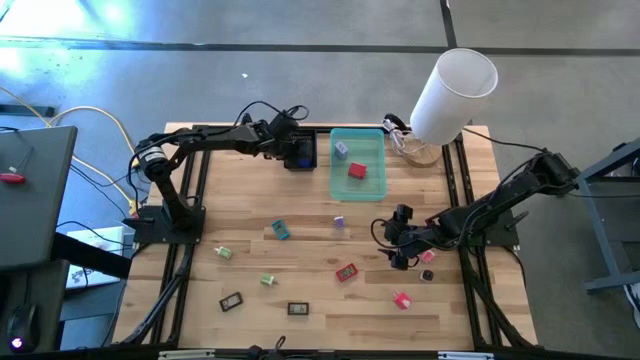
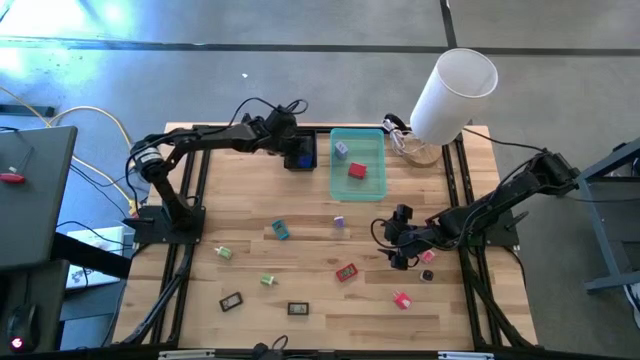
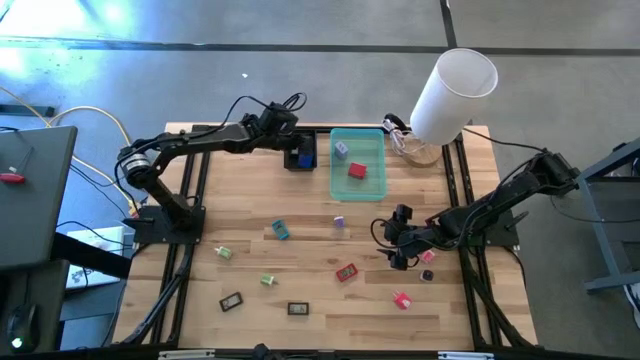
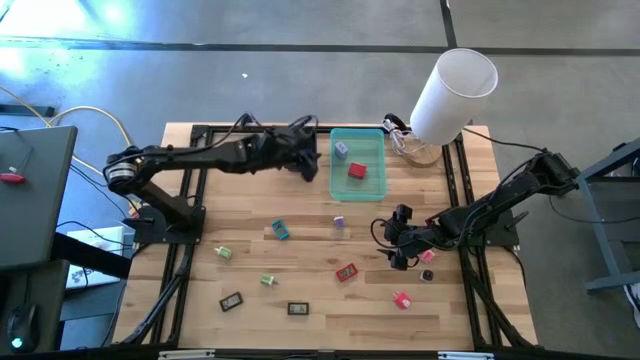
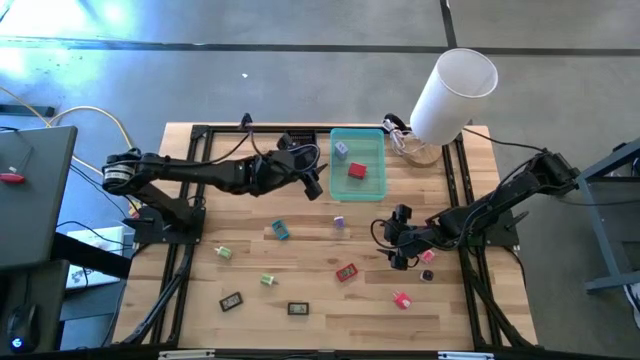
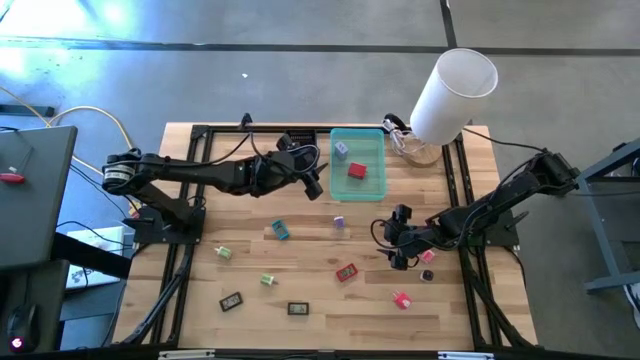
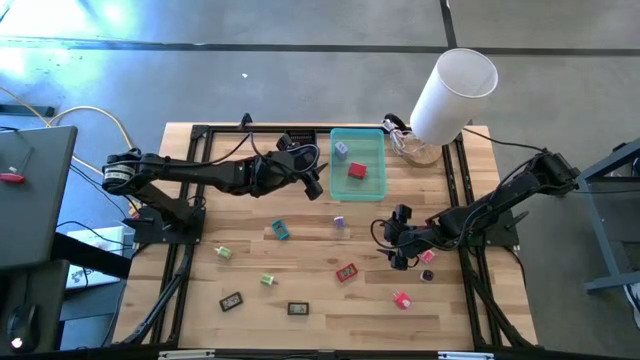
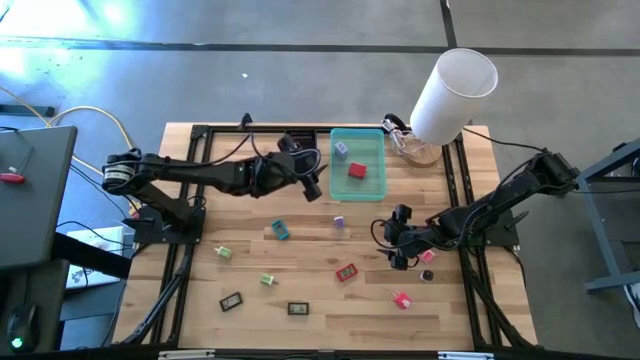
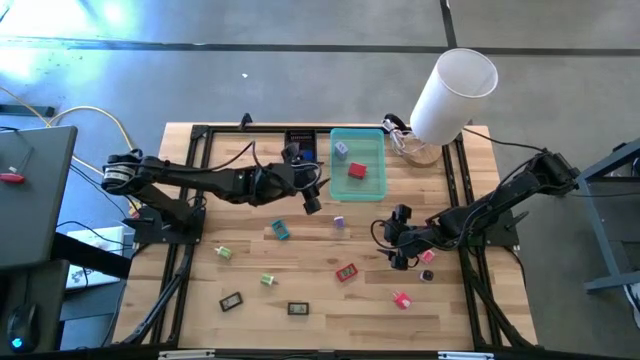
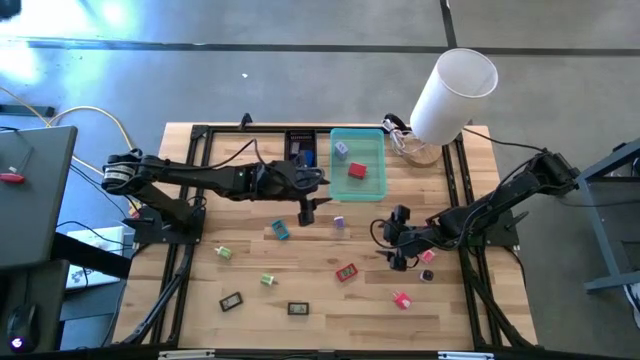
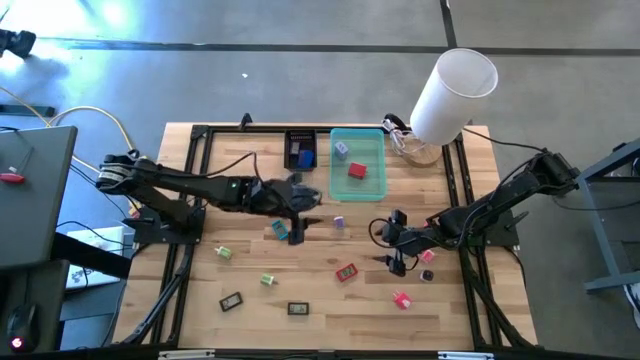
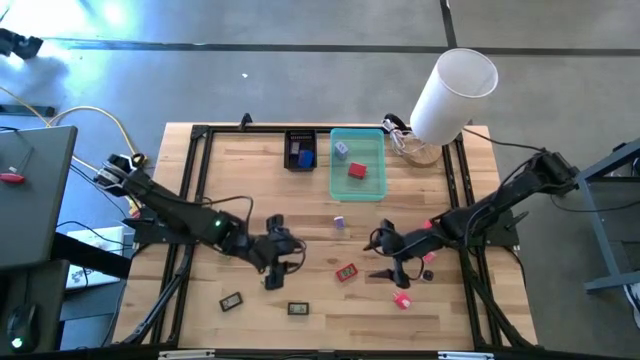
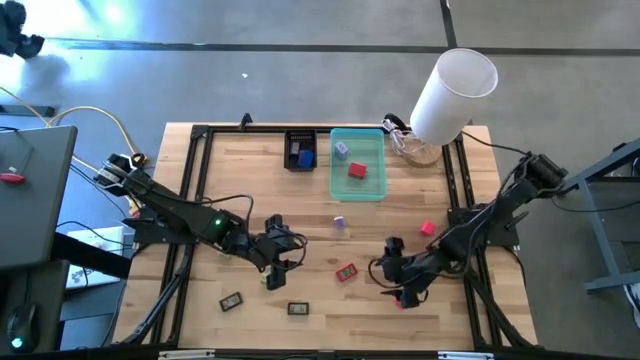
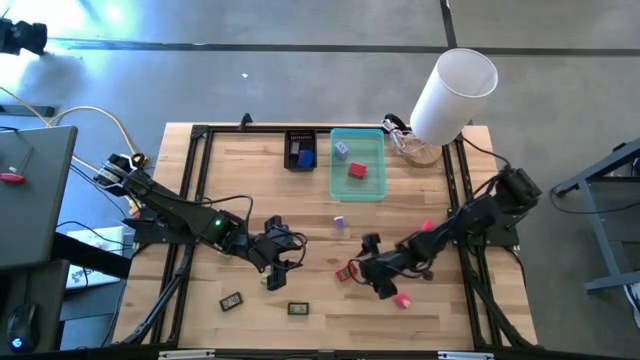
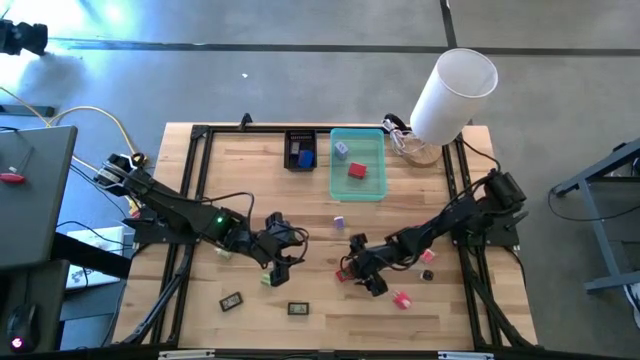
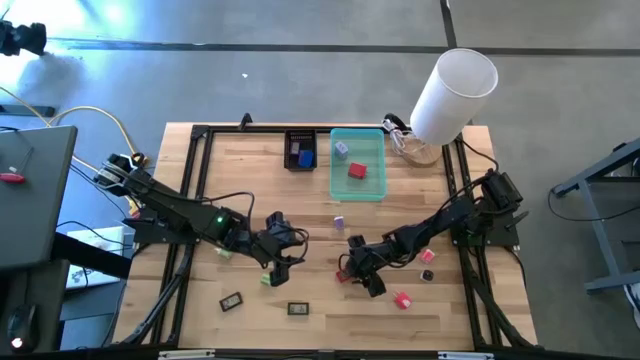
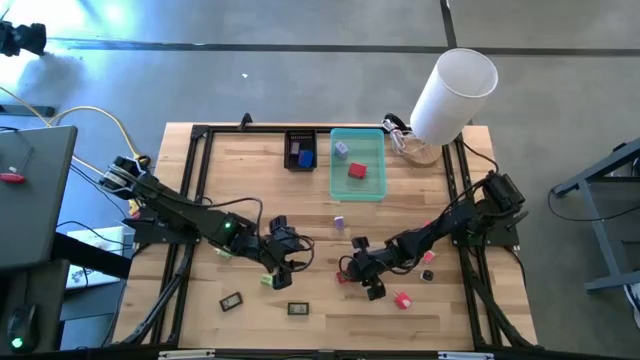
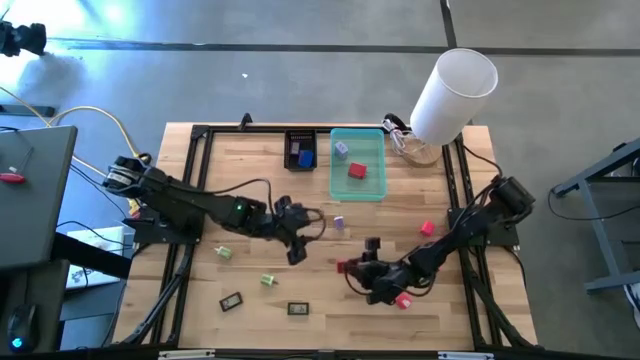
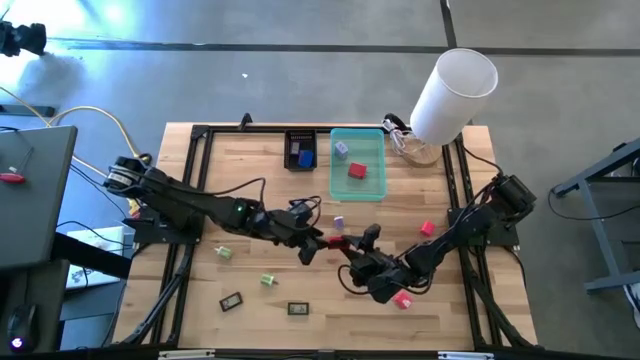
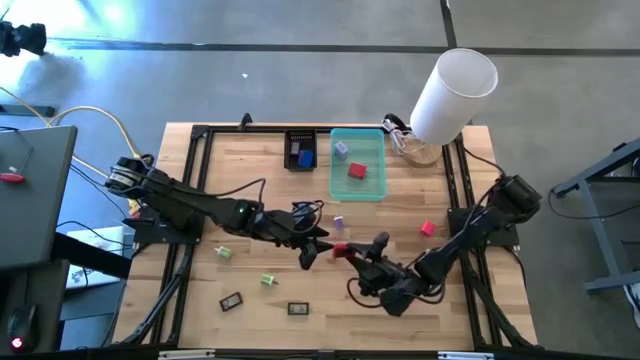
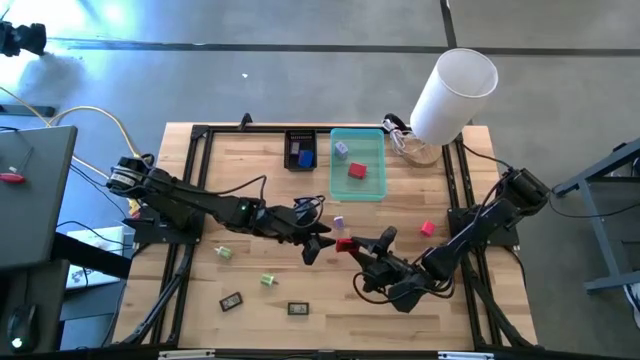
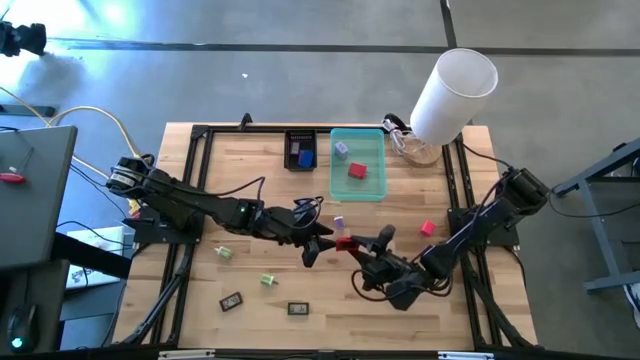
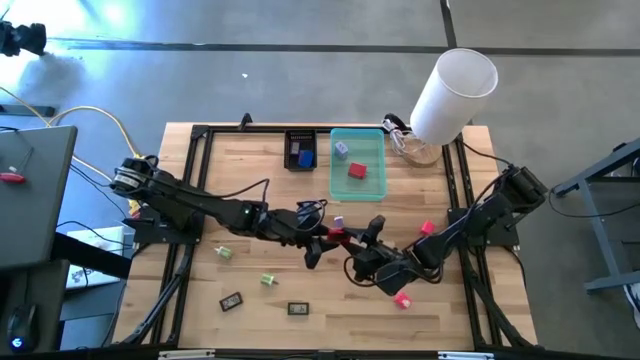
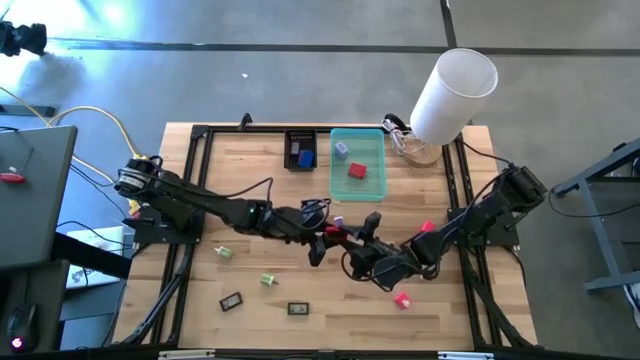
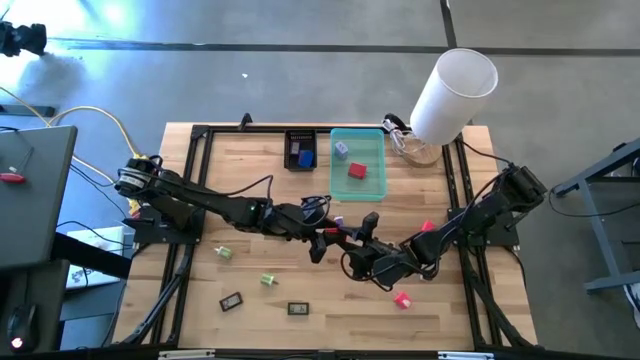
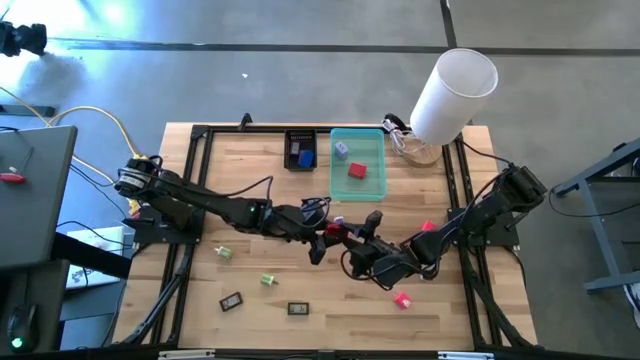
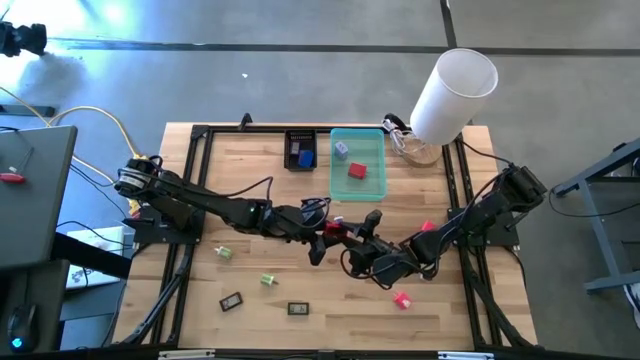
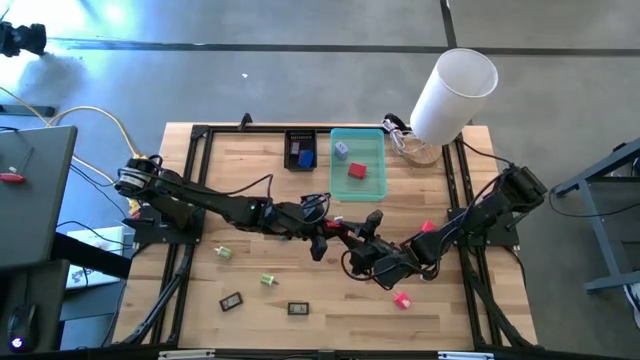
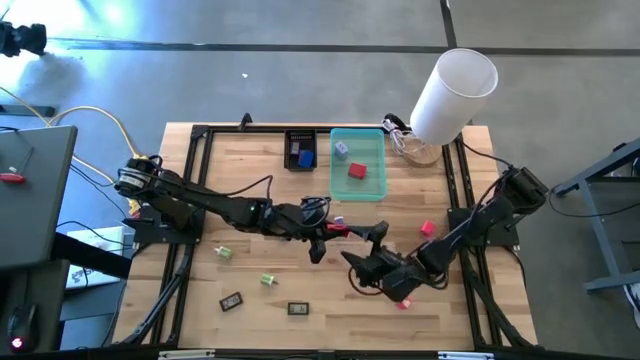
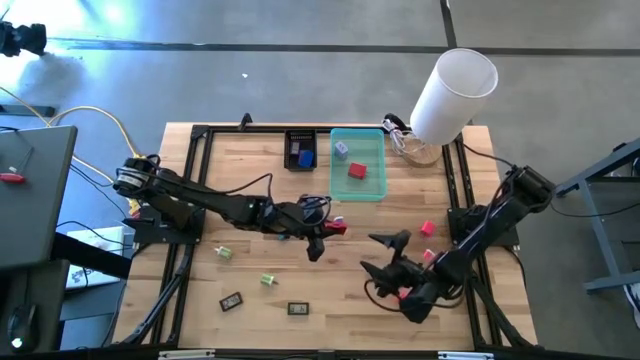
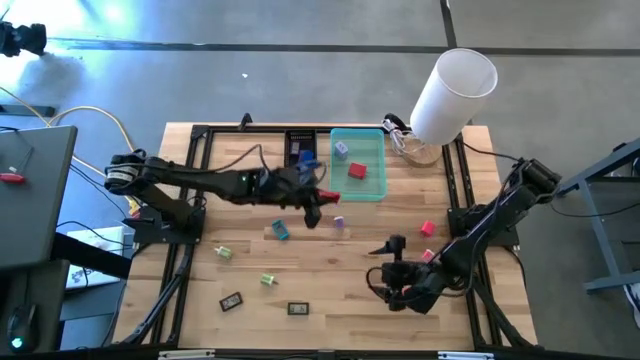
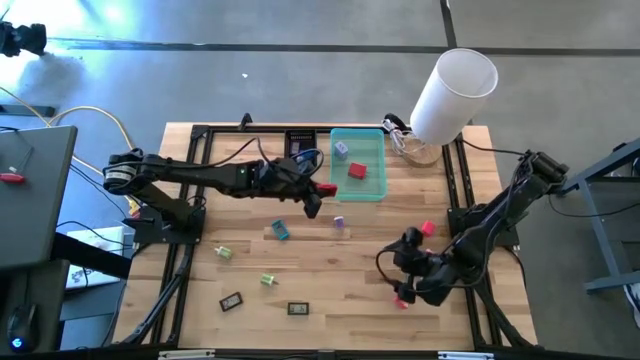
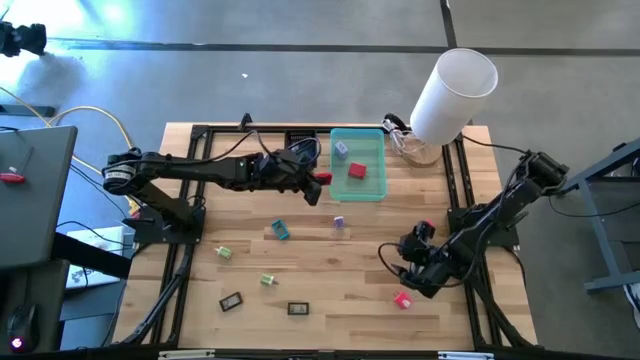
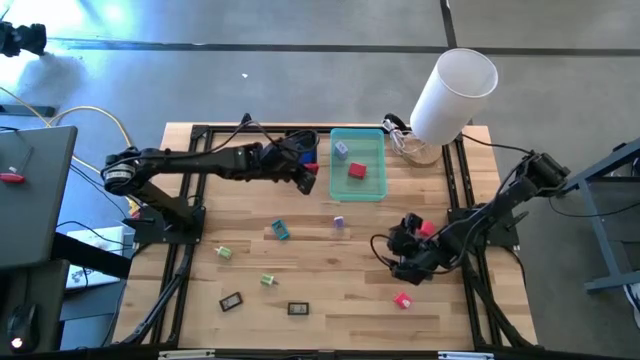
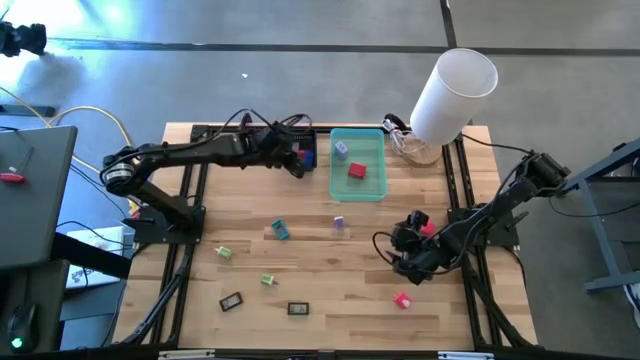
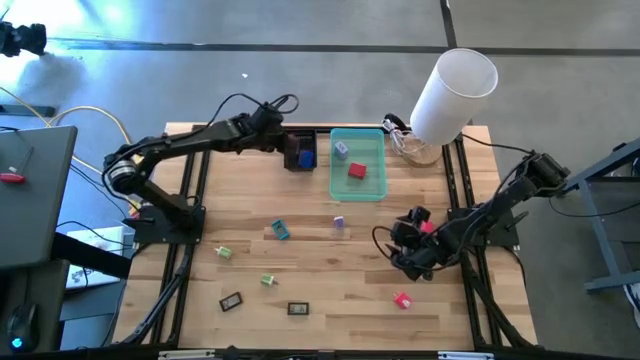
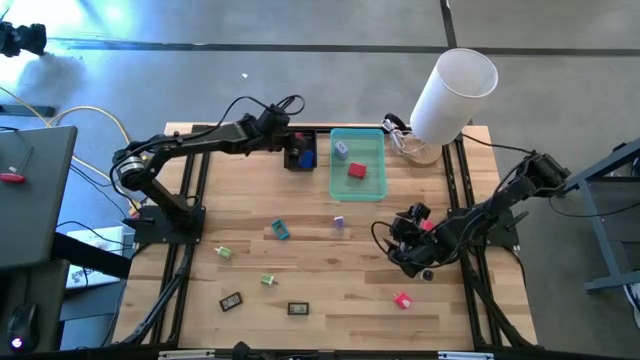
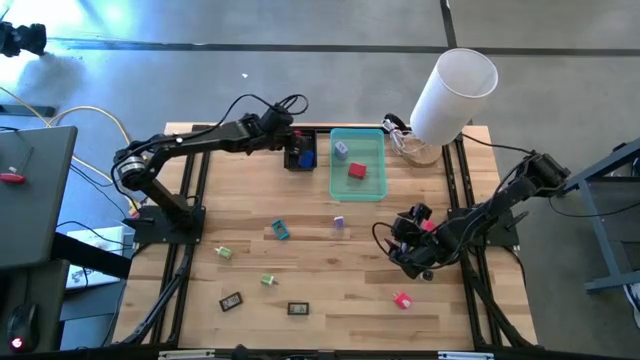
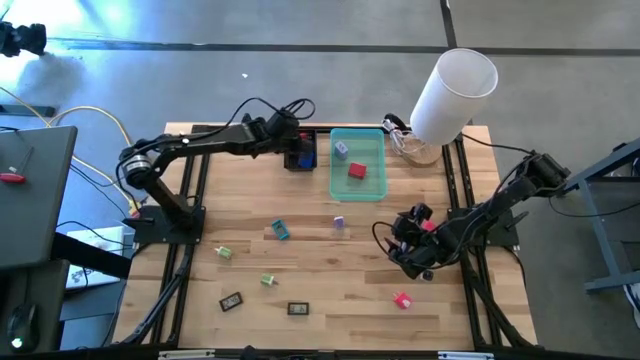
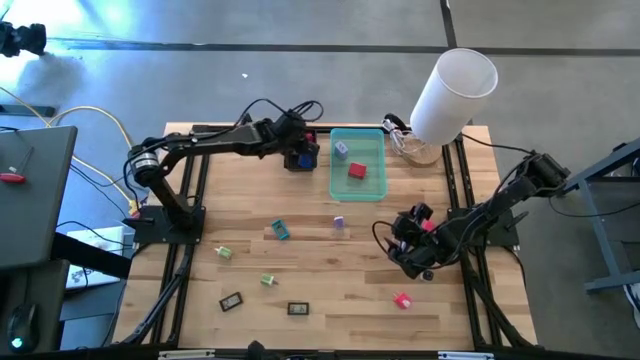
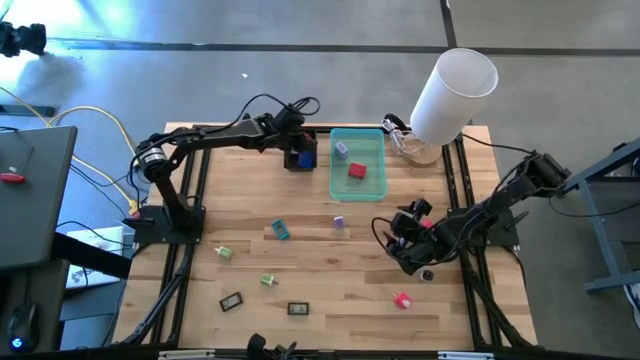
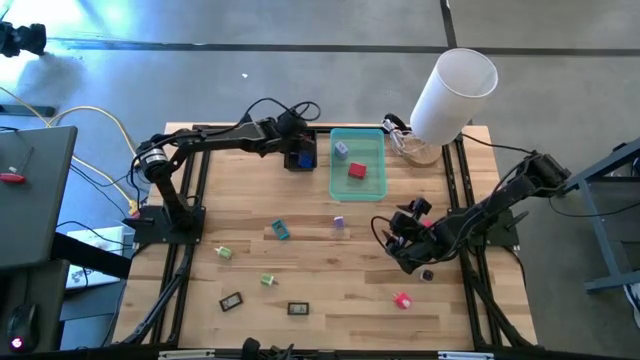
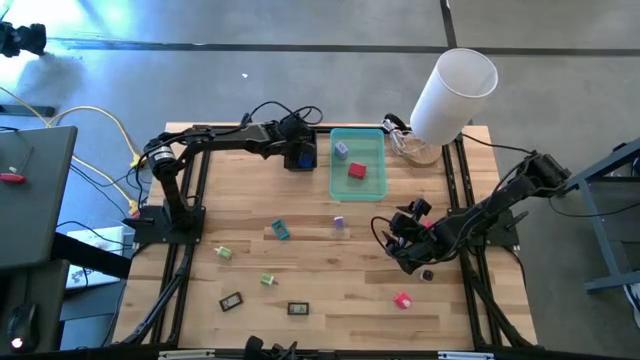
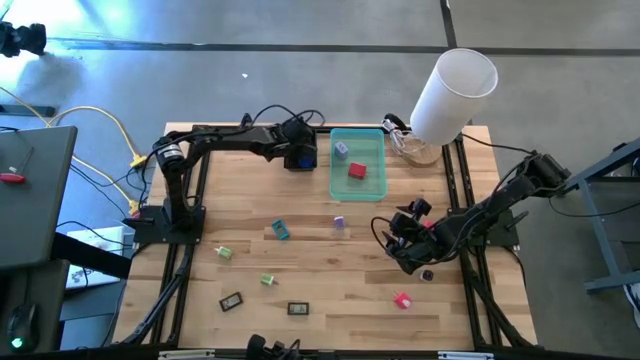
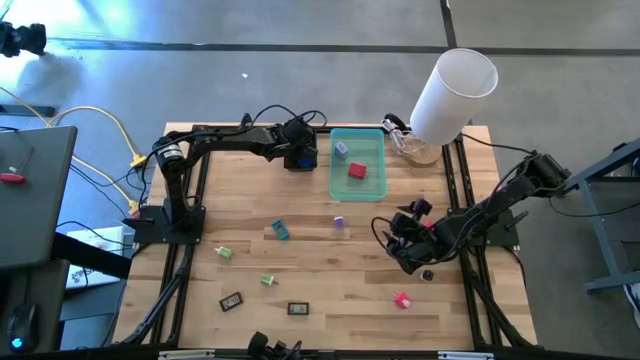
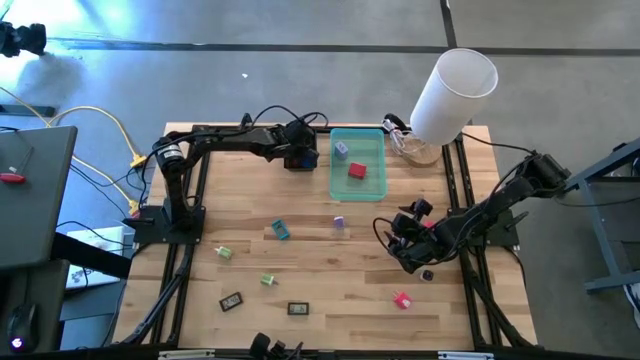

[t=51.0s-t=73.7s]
Task: Pick & Place Office items
Put the red digital timer into the black bin
